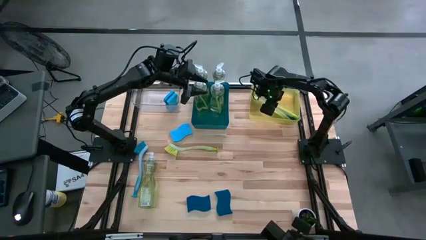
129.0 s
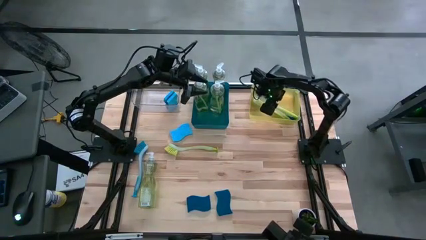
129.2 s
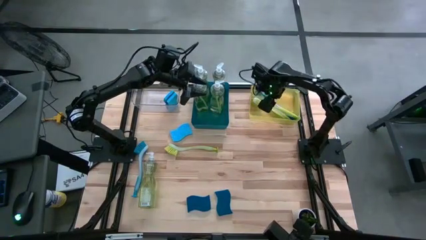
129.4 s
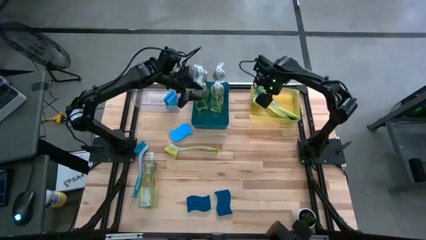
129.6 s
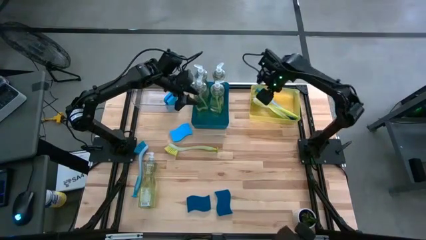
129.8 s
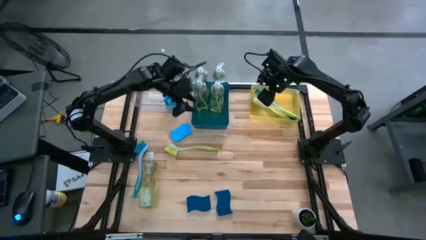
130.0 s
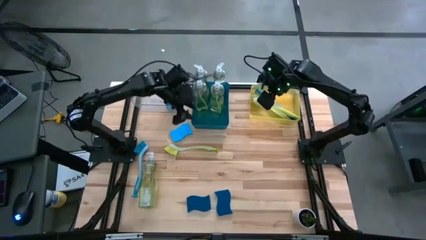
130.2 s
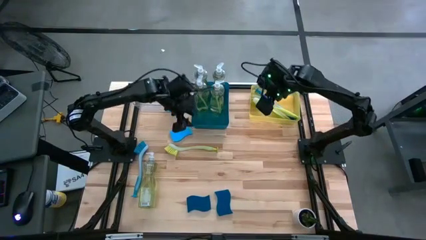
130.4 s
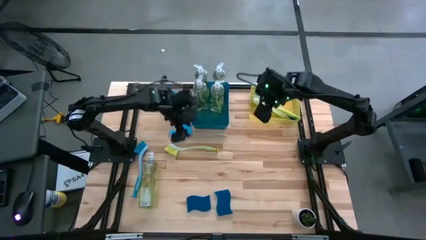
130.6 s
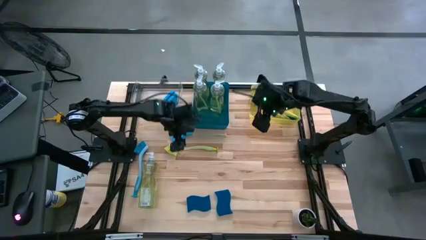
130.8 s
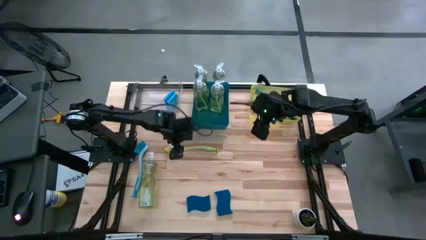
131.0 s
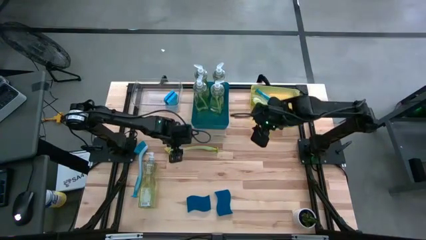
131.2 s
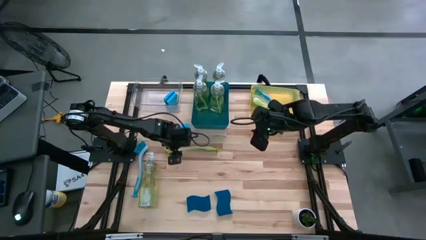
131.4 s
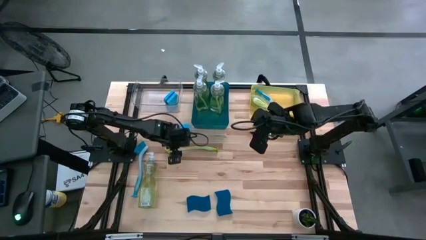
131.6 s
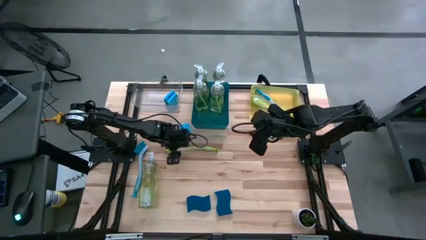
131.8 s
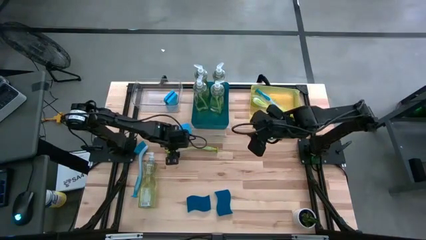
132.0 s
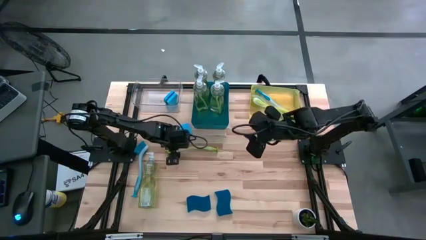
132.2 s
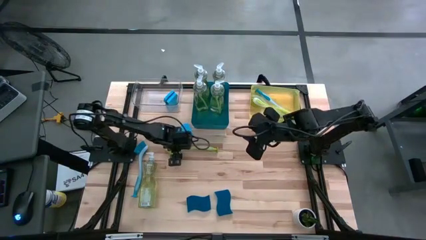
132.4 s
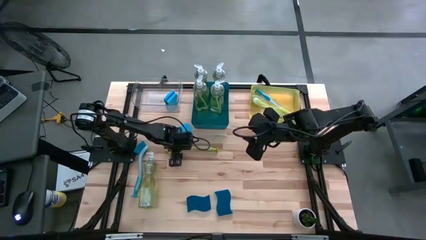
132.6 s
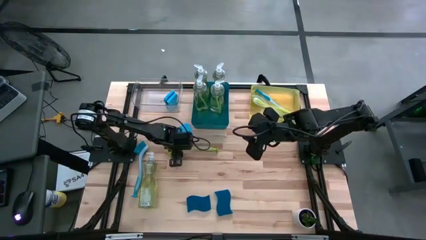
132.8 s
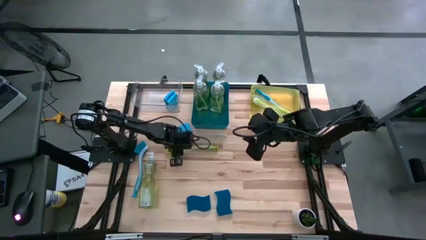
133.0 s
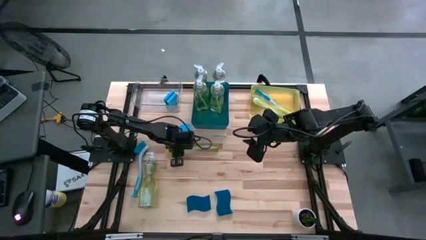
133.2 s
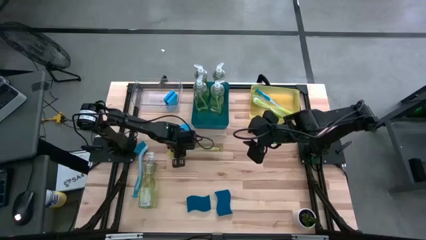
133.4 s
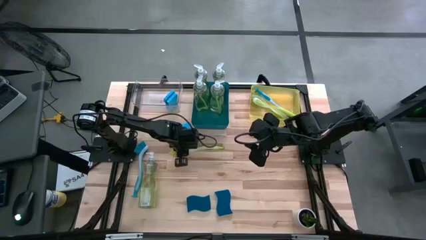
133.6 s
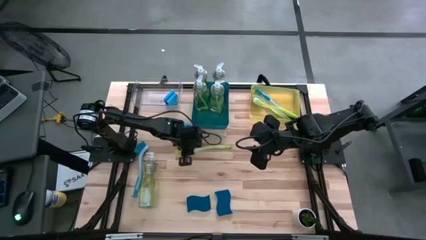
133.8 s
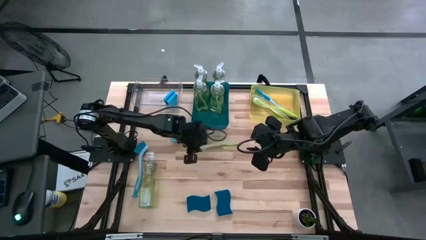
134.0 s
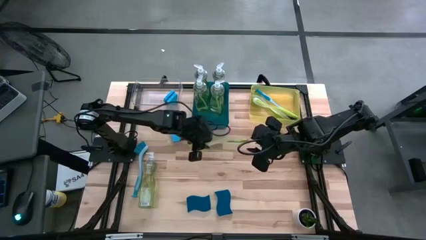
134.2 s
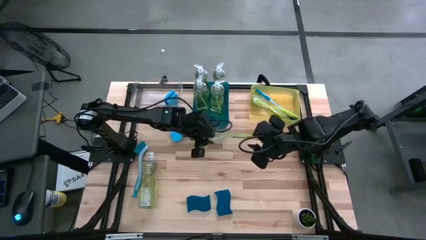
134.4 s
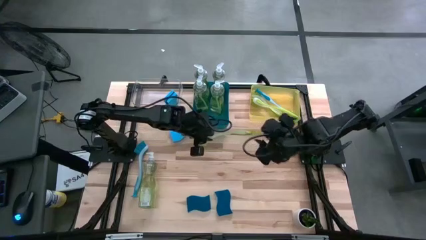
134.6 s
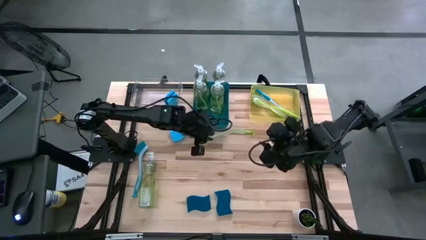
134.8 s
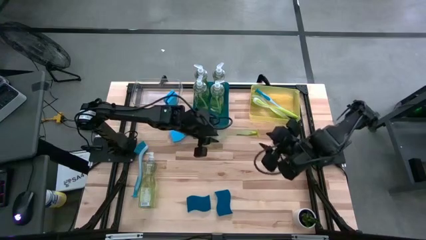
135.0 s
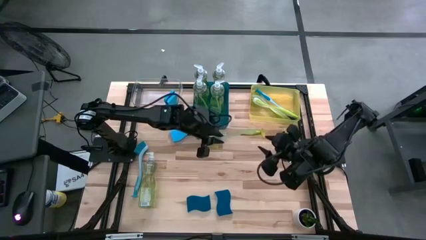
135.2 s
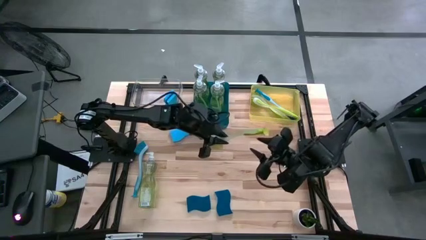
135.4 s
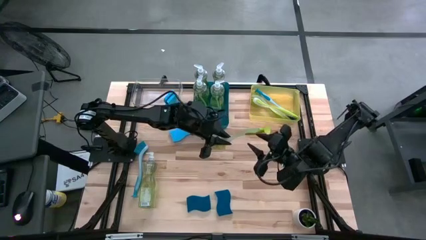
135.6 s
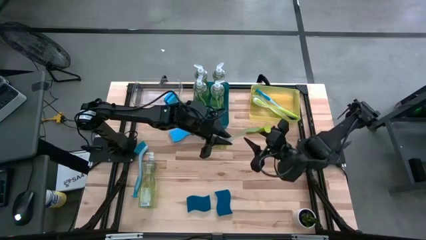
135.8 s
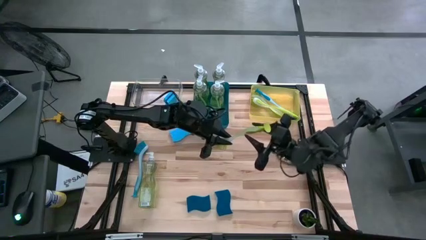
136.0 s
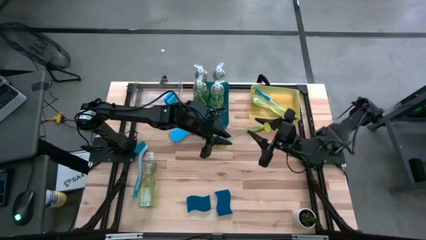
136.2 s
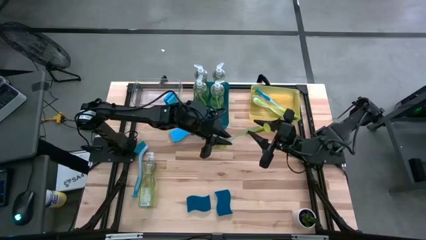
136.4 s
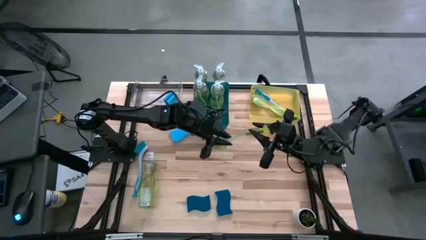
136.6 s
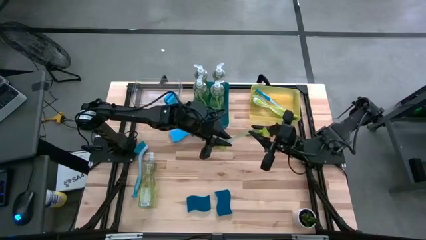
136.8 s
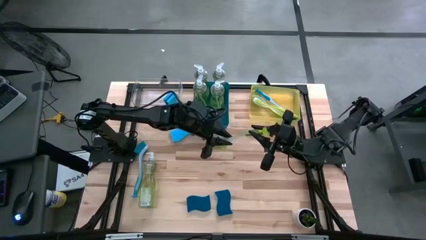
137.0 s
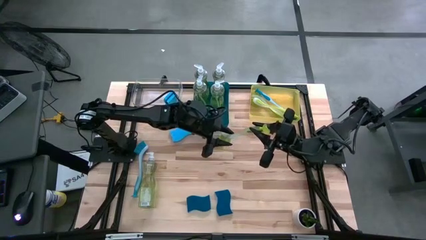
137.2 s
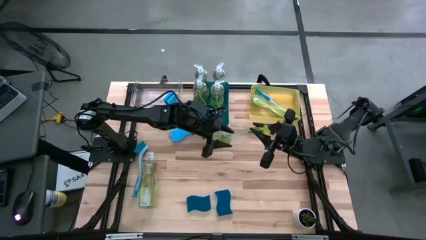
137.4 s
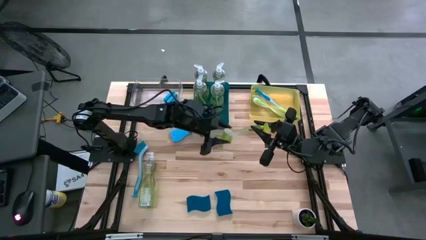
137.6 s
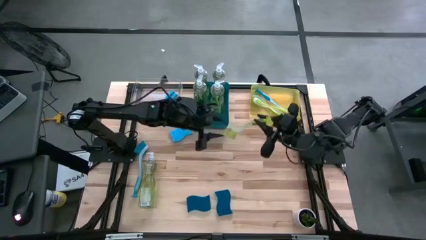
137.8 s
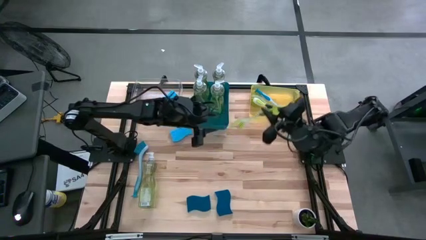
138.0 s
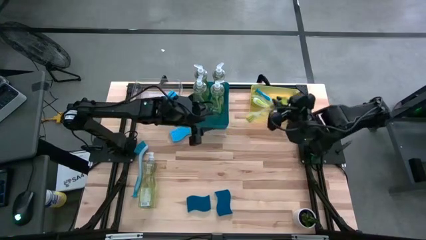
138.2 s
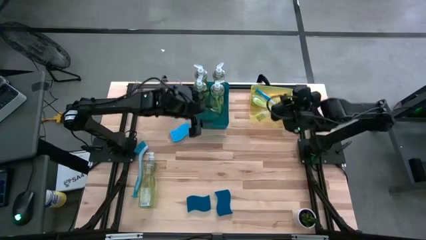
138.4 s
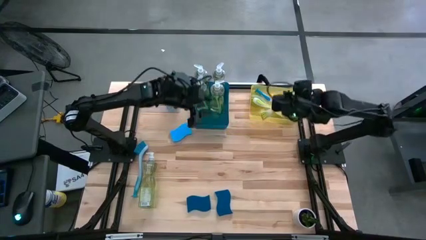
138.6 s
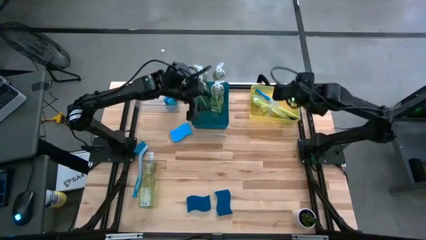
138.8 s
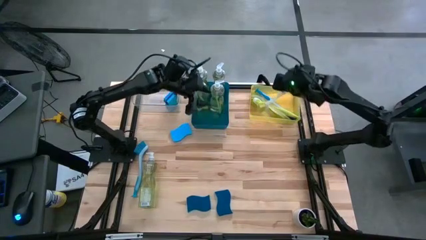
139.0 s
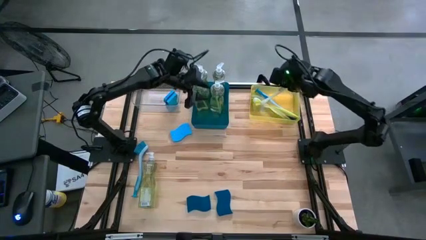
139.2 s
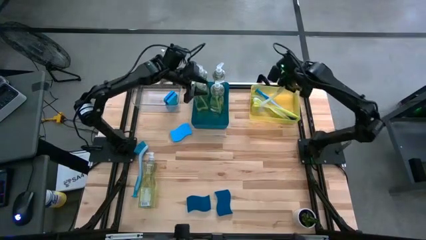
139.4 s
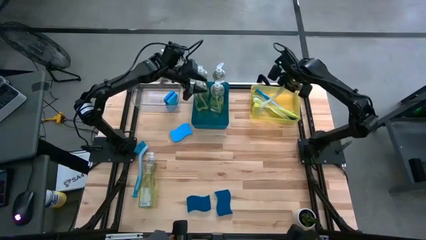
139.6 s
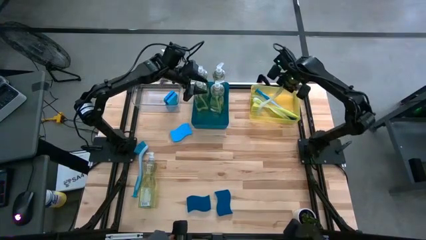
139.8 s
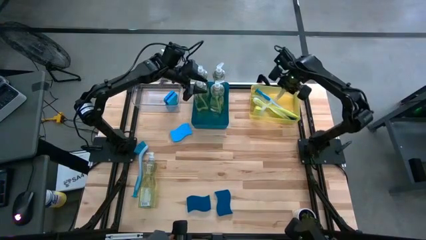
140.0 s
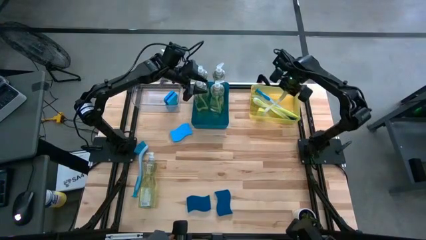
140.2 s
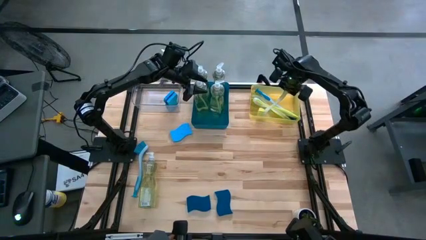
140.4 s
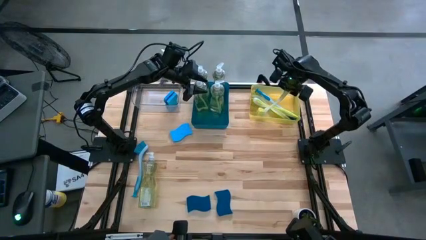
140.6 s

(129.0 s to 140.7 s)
Task: Pick & Place Kitchen Sink Supplies
Put the green dish brush into the yellow bin

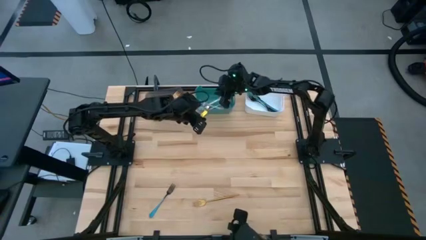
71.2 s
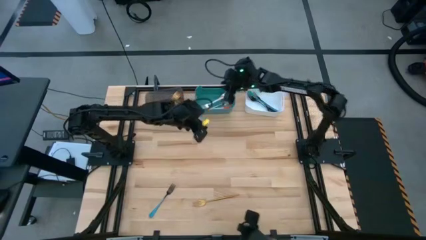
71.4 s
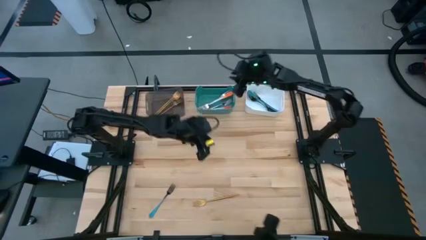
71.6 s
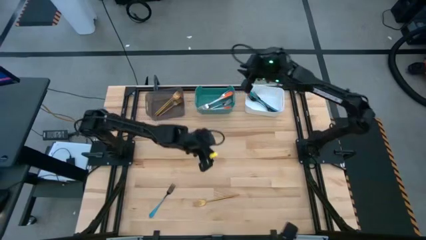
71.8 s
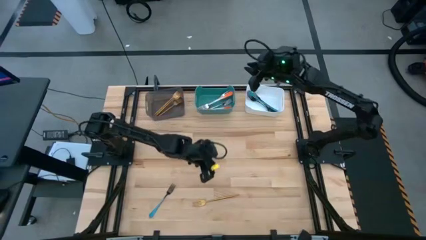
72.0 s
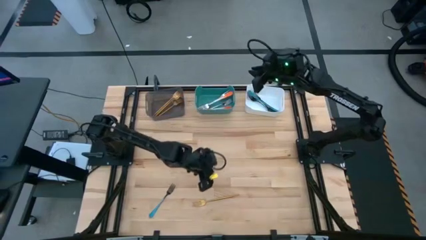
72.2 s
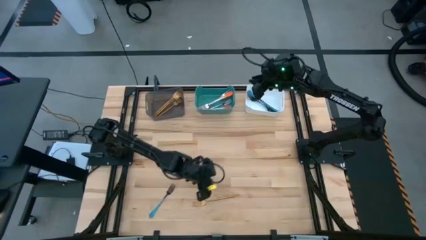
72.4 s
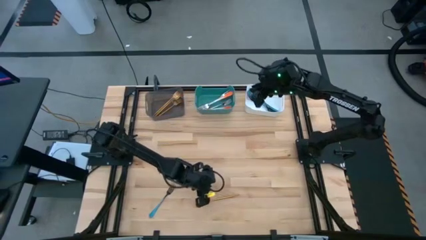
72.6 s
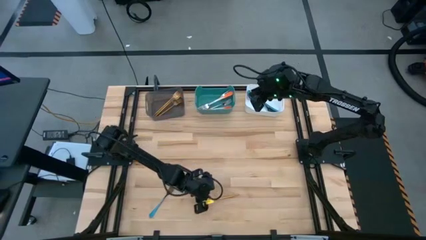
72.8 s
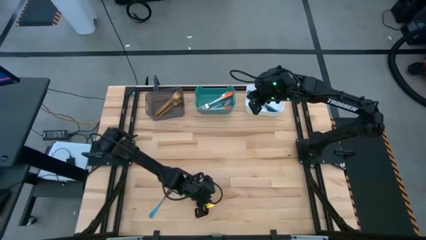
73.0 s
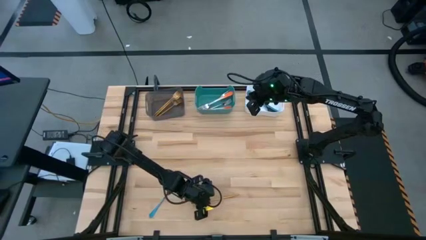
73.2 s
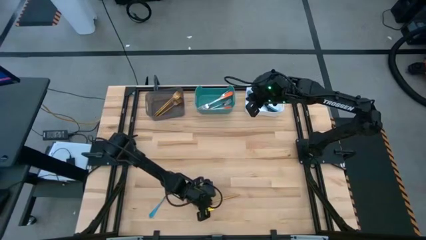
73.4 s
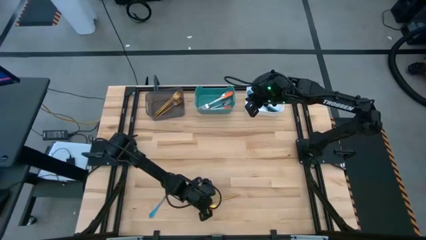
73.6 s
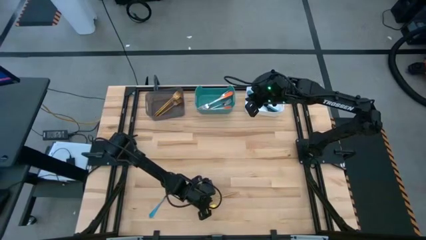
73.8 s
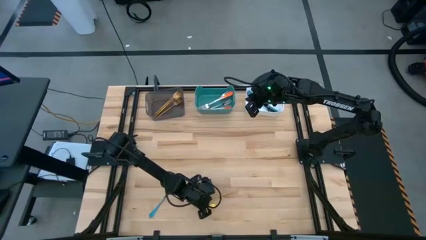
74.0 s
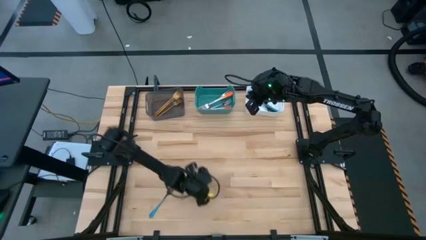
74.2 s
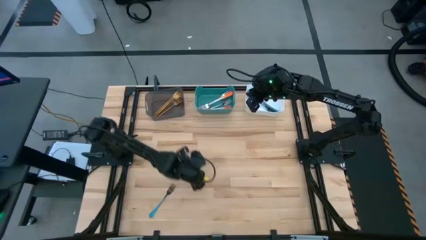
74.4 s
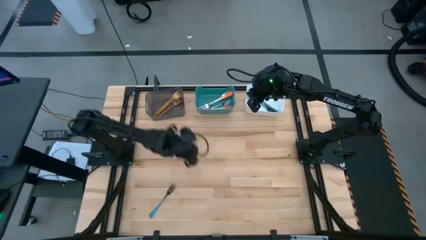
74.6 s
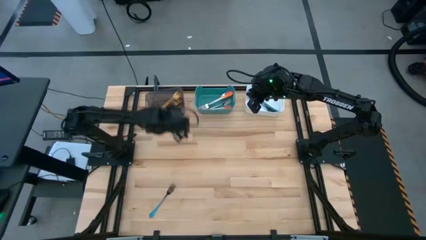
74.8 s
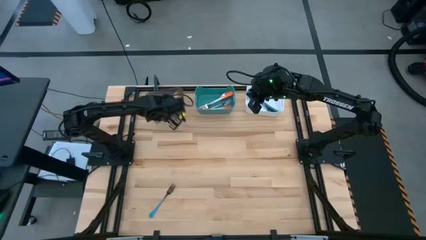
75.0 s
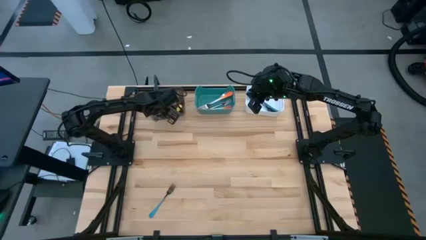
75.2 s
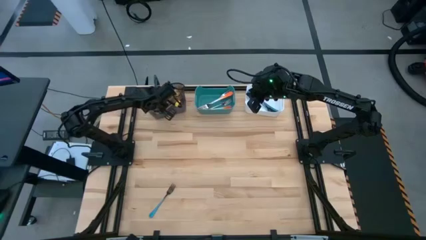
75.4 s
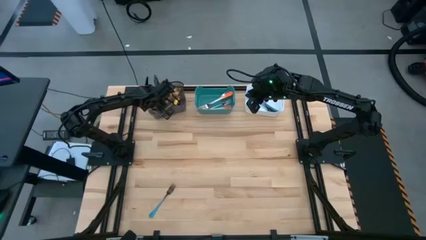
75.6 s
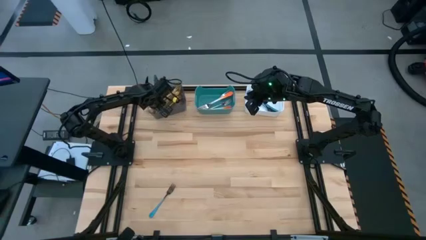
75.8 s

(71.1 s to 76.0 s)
Task: Sort silverware by color (type)
Put the gold fork into the black bin
